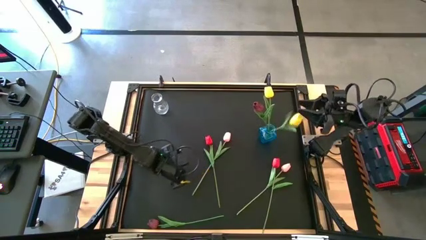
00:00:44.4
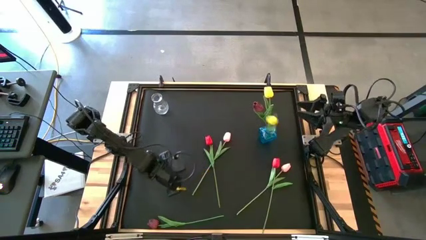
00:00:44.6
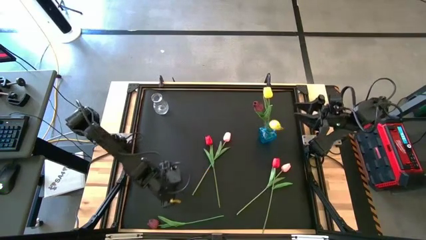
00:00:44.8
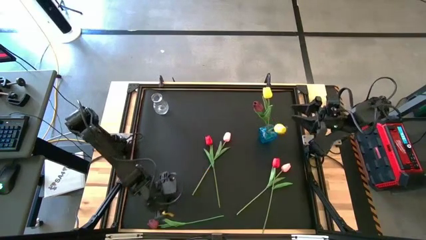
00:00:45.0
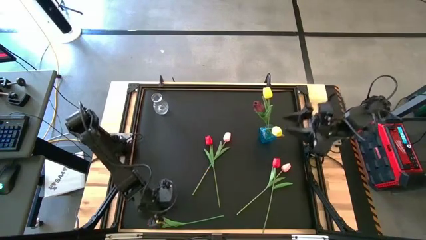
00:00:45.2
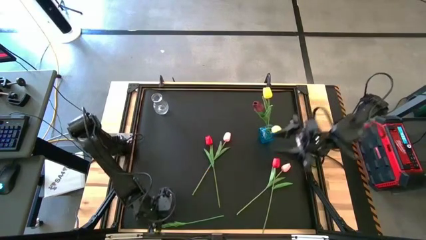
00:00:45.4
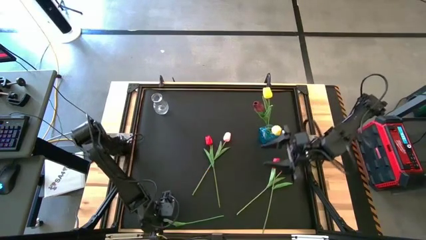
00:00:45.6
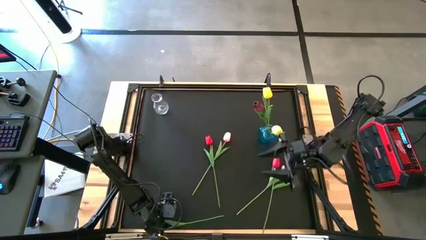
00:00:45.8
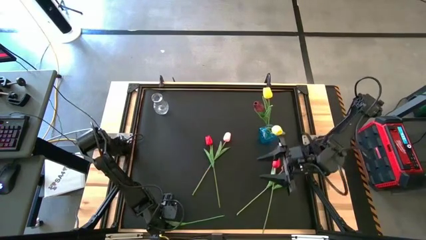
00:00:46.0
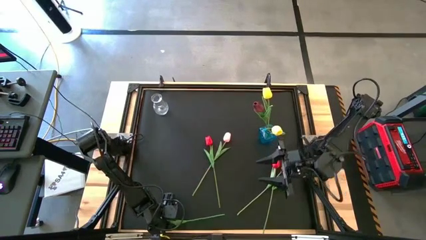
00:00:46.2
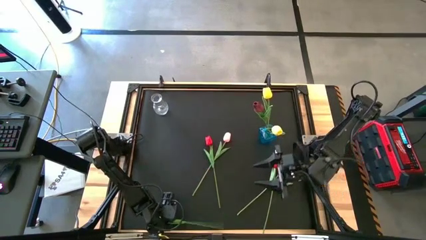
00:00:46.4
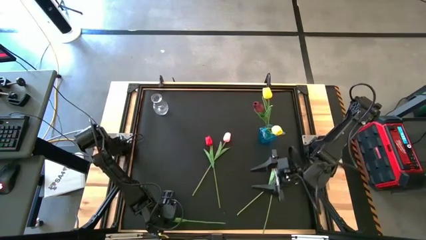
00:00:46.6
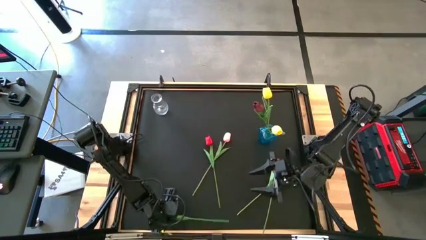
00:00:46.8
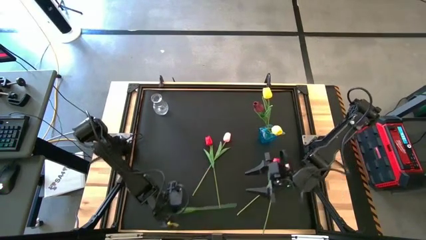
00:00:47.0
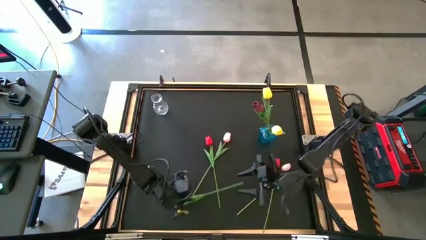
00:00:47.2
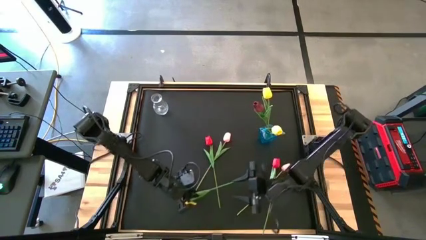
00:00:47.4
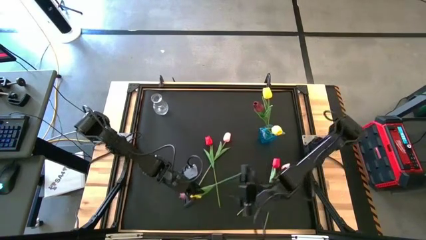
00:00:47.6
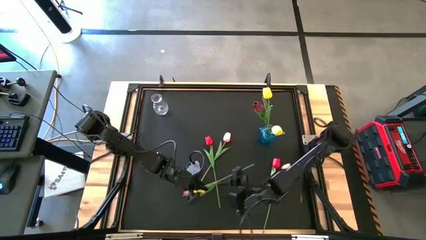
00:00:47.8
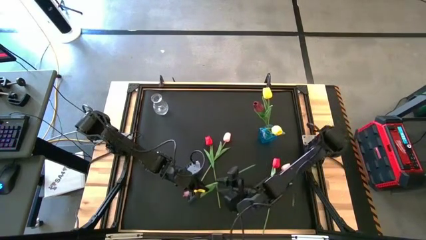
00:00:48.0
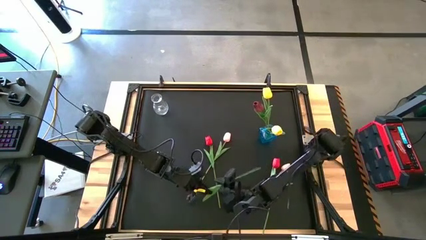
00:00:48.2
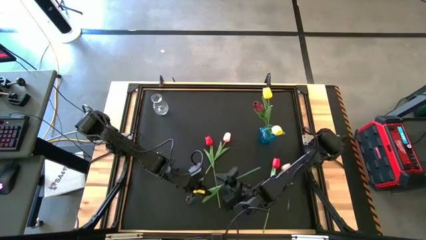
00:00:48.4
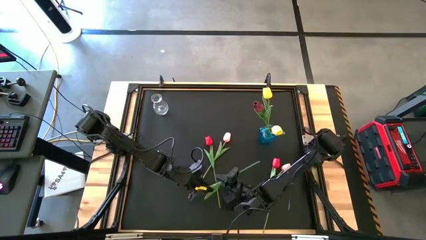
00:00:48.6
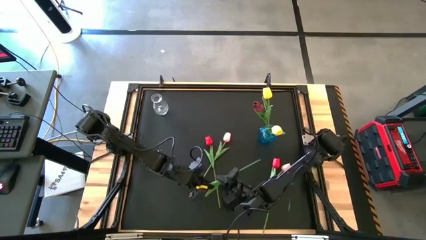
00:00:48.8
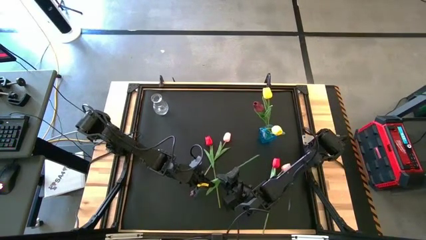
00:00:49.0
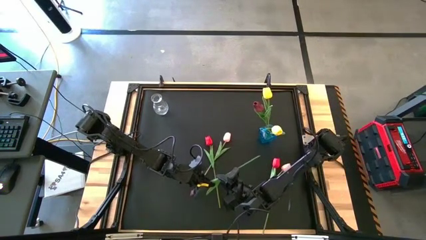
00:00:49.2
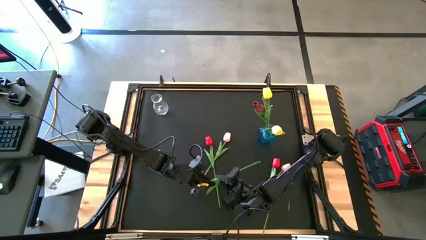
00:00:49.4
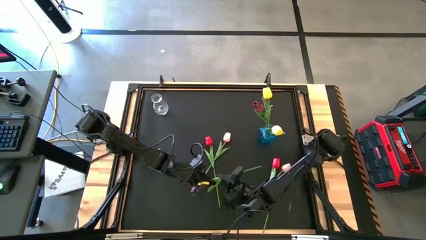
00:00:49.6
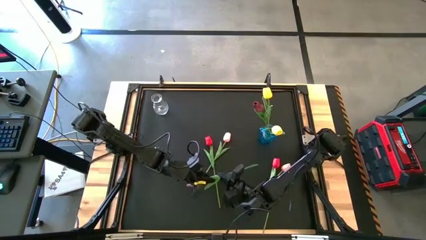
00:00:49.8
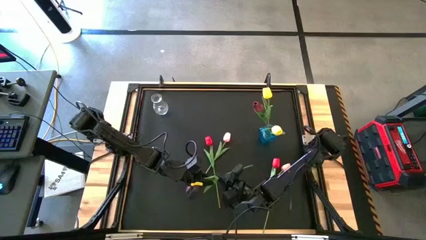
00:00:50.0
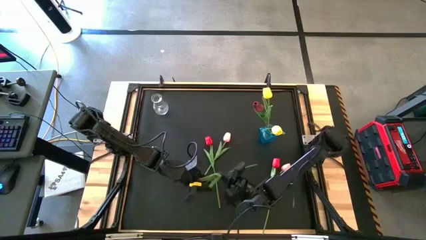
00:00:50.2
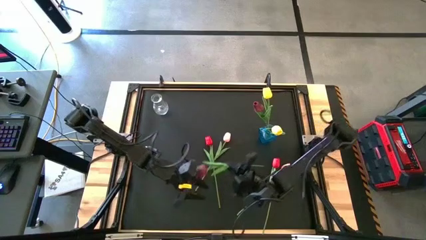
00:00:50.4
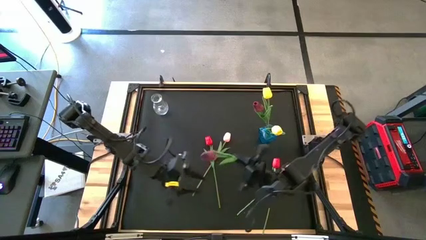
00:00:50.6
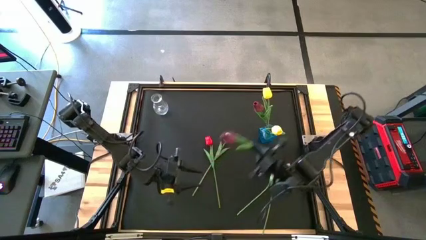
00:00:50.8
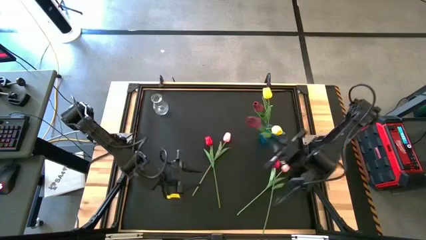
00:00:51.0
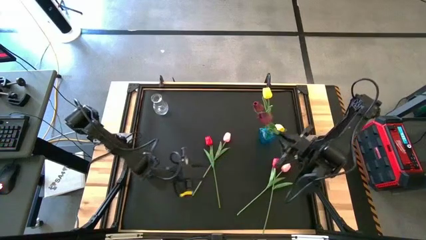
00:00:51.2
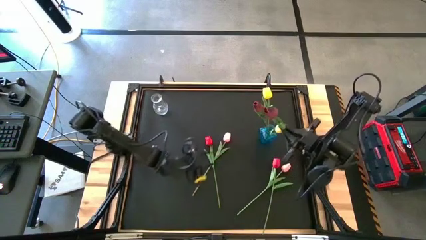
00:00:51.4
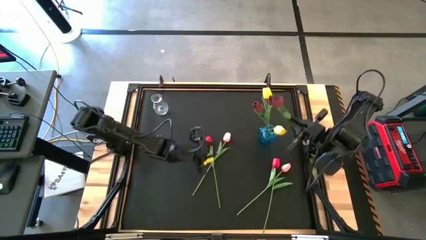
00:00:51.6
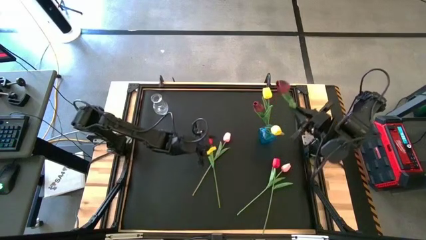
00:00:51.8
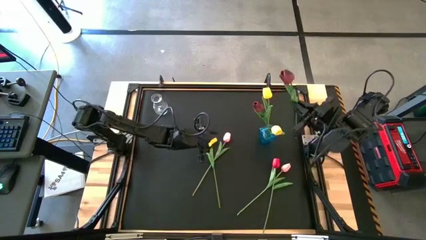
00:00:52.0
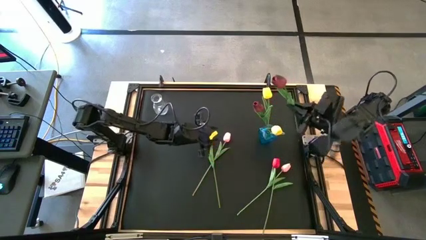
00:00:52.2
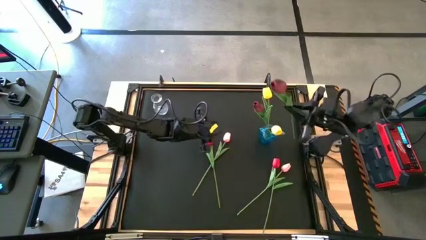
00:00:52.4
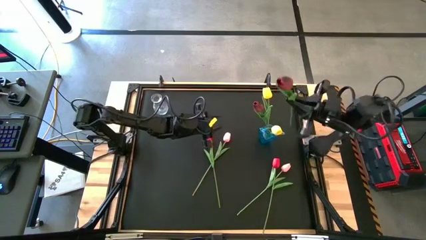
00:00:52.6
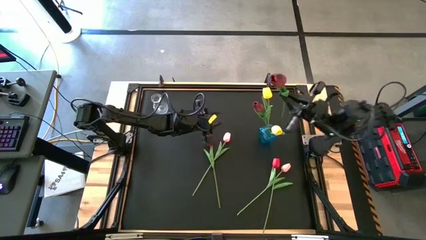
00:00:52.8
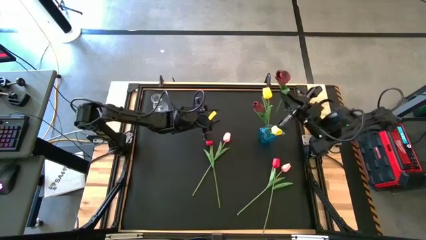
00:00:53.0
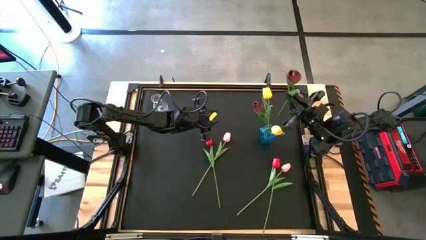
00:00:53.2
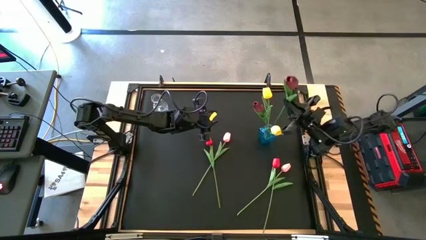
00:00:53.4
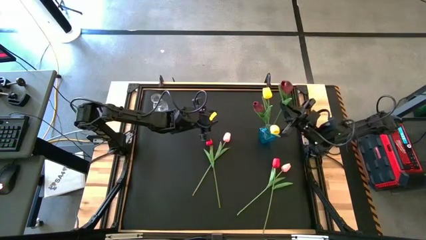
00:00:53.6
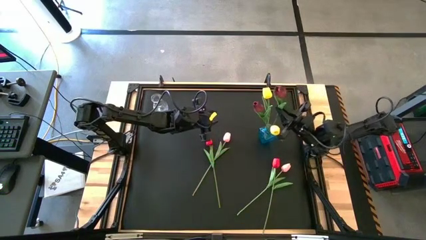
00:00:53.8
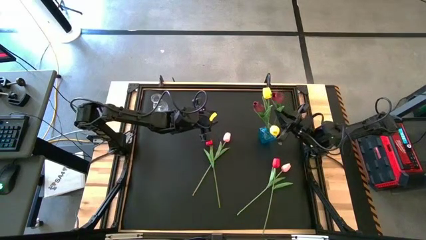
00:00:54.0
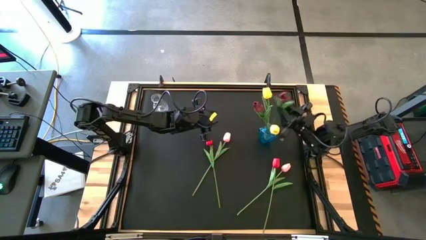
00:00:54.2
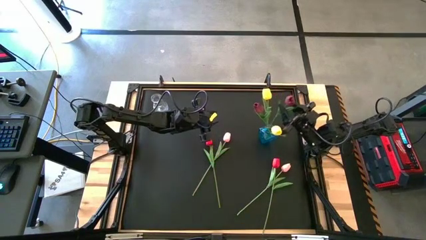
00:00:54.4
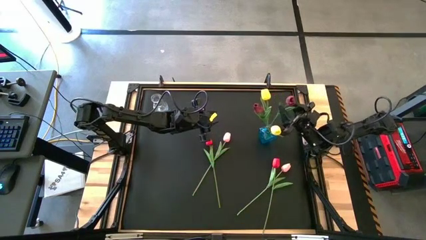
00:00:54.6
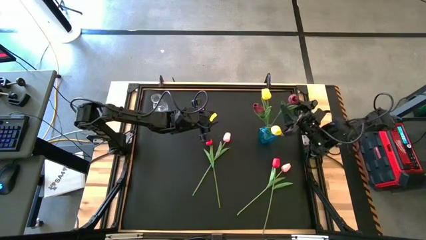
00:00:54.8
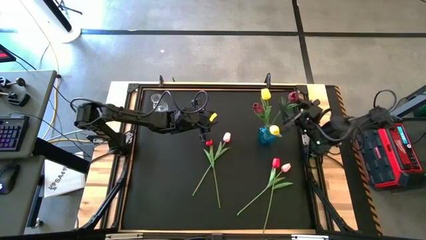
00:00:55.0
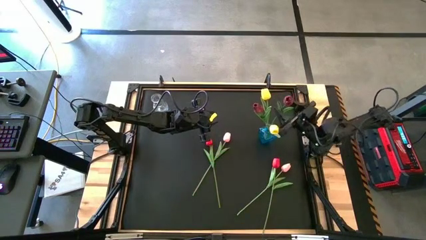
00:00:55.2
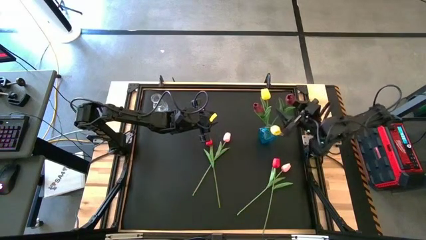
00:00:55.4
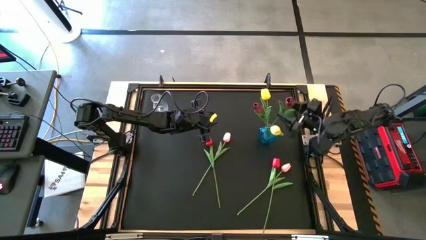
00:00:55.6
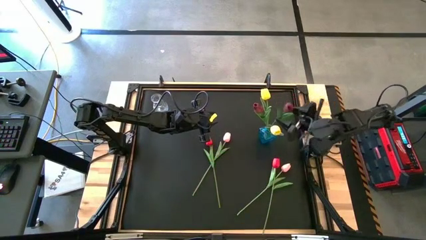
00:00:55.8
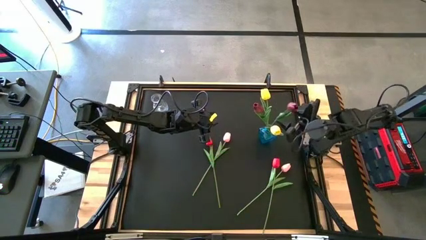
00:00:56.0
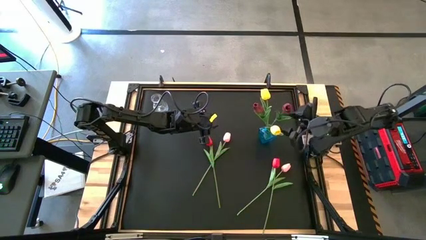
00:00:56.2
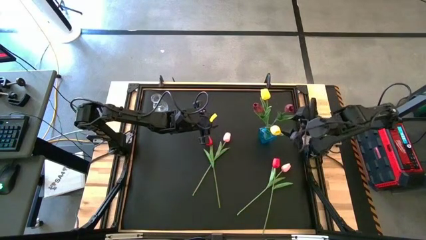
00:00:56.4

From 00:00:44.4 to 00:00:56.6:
Task: Sort flowers into vase by color
Put the dark red flower into the blue vase

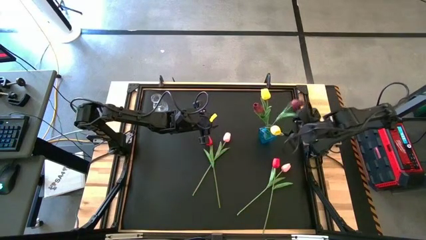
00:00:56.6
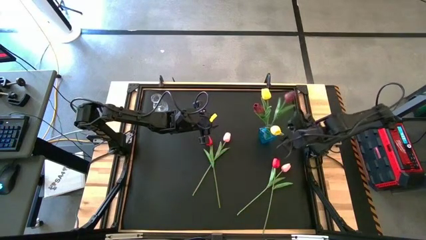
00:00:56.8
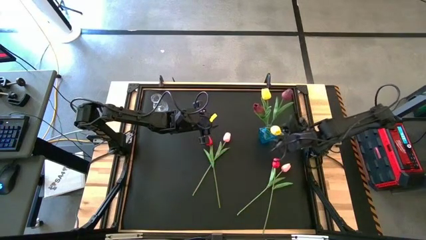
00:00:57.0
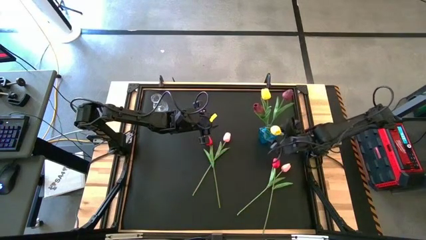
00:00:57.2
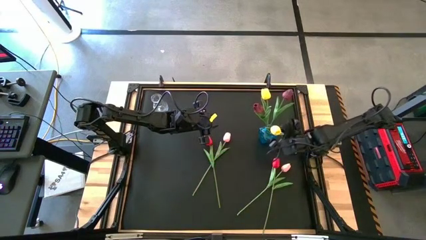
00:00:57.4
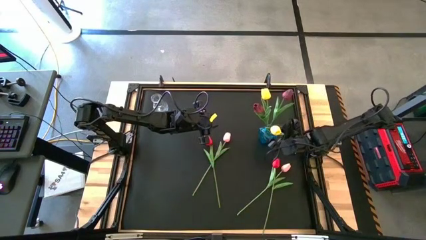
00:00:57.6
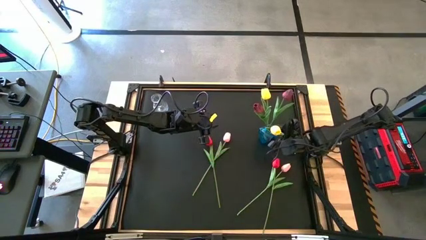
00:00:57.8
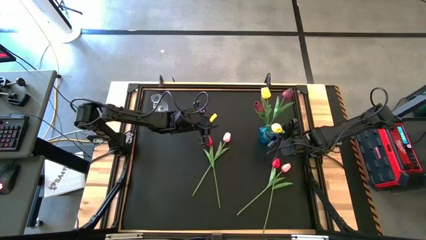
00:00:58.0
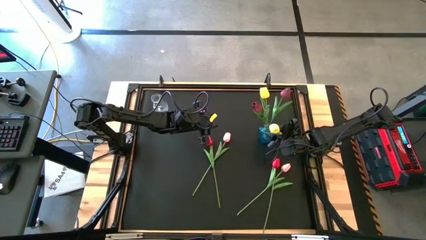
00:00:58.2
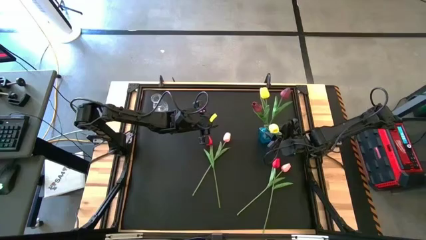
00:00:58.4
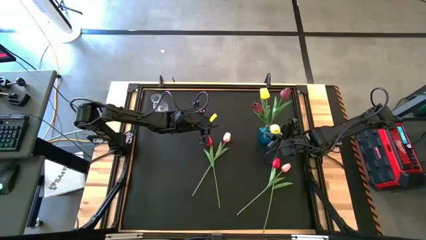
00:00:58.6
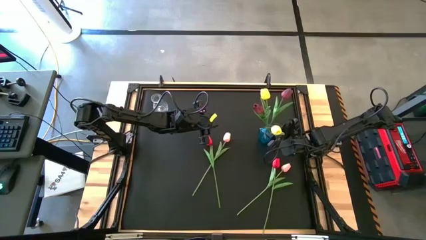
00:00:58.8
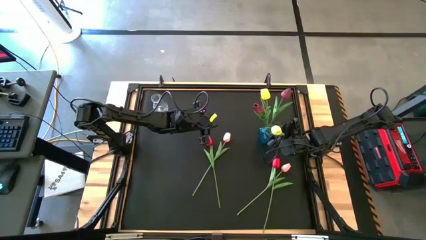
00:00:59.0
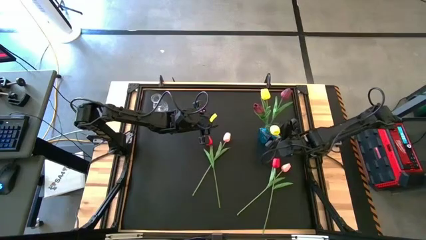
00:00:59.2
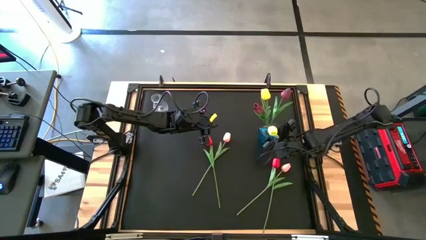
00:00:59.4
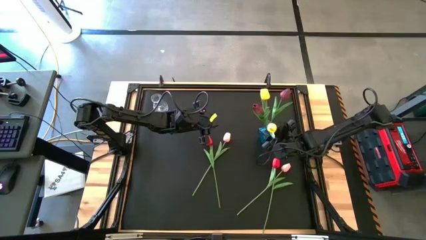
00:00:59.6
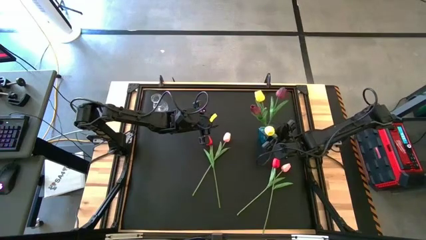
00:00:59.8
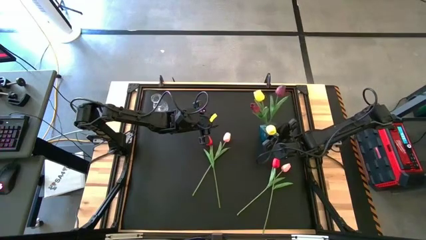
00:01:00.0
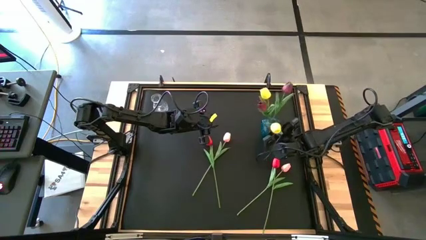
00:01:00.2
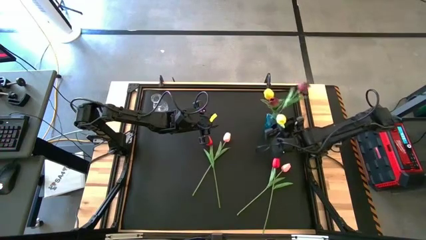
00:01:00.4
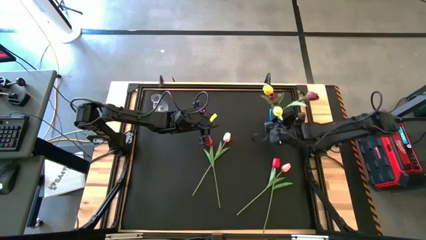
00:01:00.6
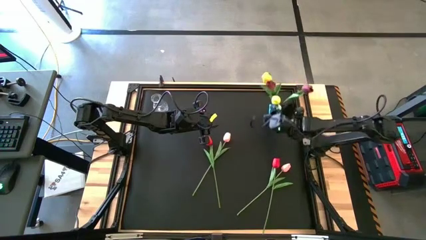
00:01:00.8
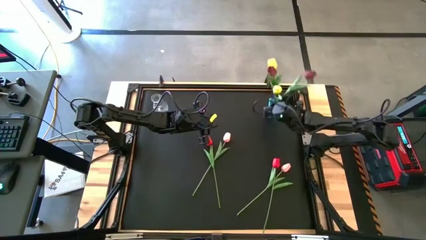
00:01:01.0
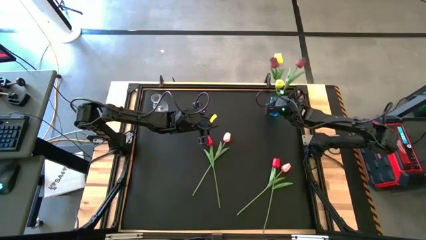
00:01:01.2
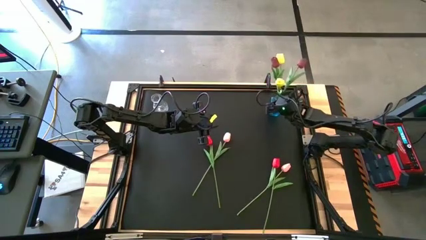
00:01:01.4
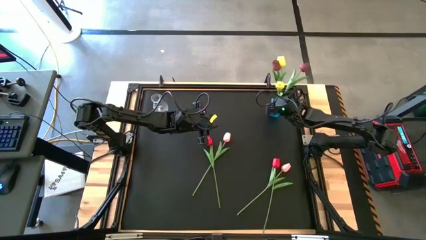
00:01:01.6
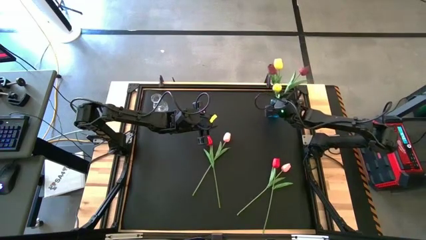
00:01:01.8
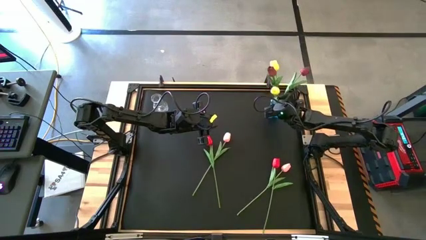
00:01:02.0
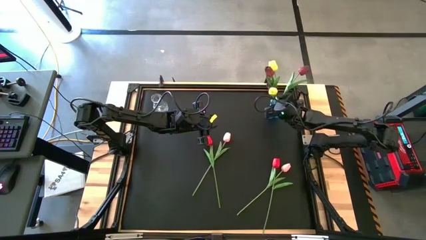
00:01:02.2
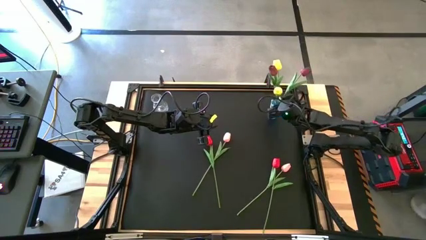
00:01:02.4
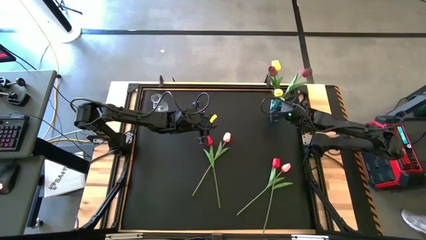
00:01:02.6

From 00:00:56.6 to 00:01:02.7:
Move the blue vase to the top right of the table
